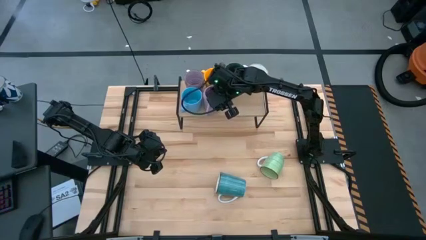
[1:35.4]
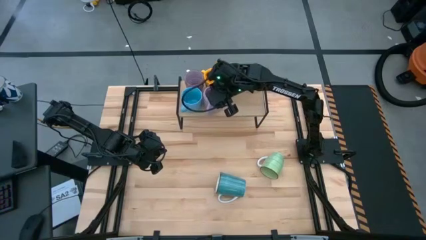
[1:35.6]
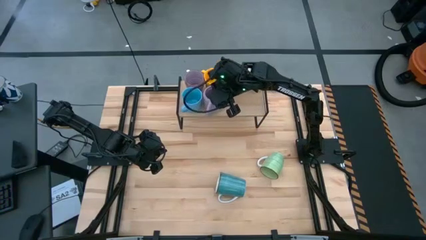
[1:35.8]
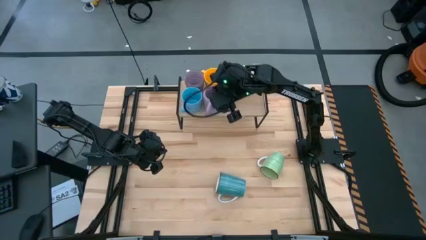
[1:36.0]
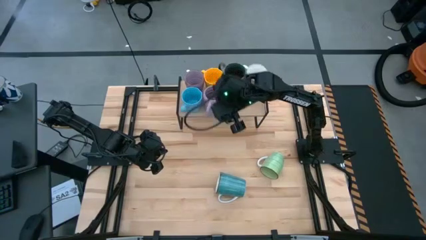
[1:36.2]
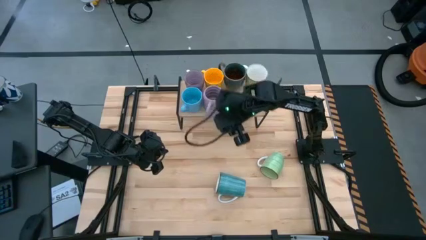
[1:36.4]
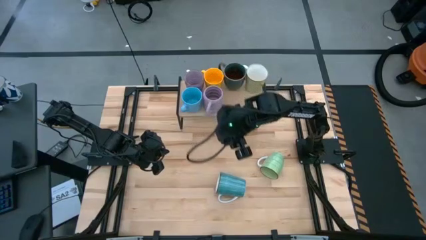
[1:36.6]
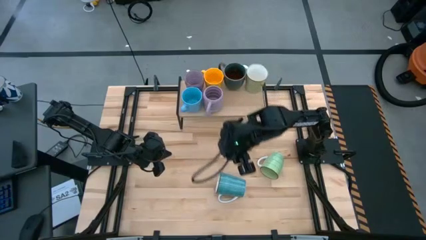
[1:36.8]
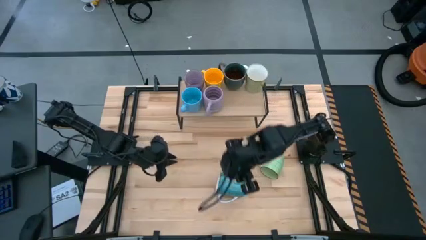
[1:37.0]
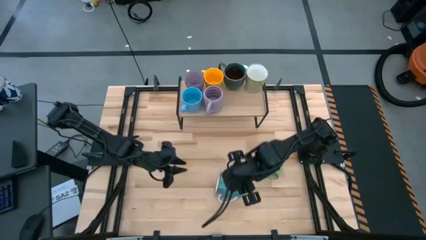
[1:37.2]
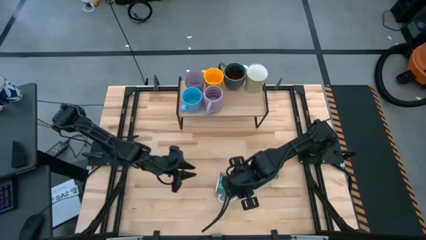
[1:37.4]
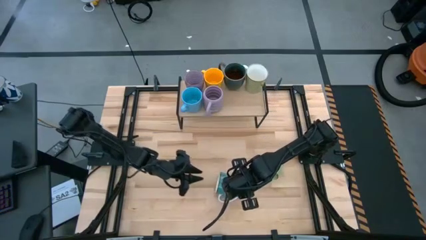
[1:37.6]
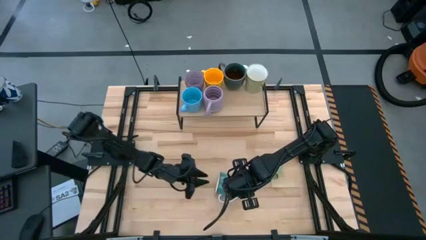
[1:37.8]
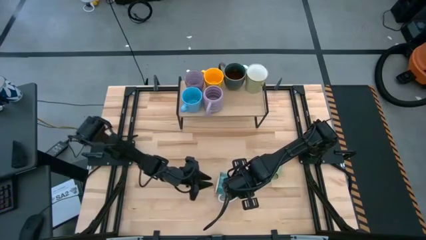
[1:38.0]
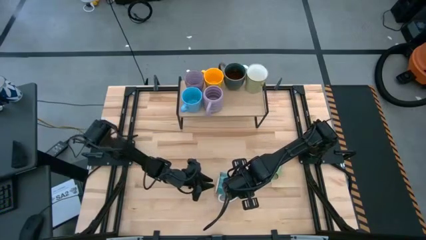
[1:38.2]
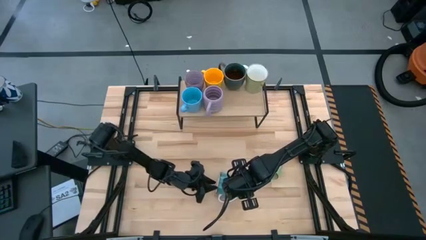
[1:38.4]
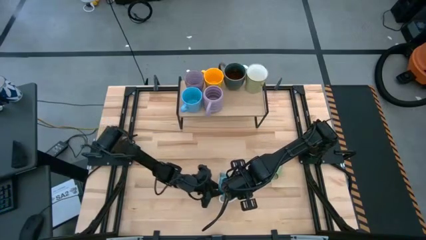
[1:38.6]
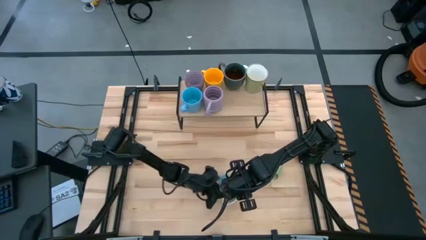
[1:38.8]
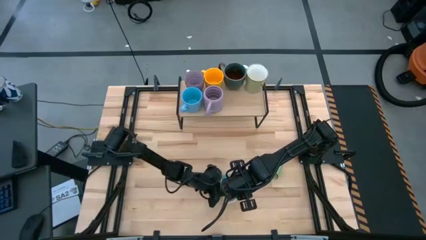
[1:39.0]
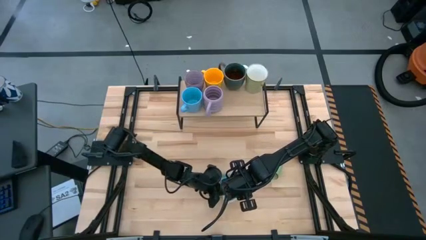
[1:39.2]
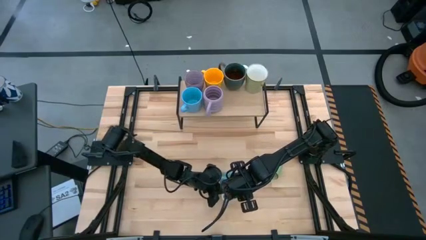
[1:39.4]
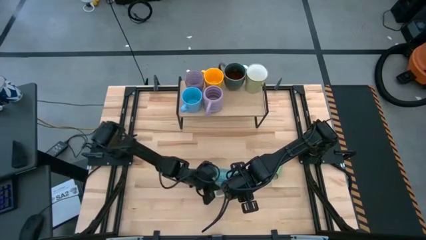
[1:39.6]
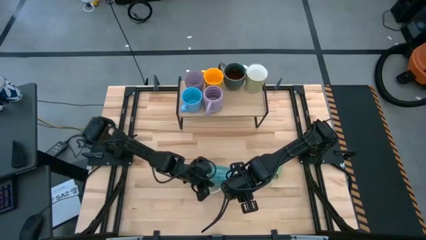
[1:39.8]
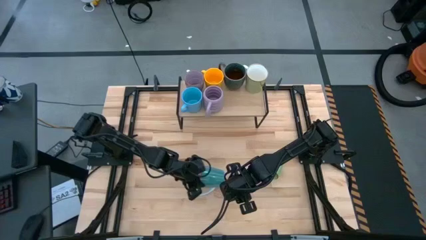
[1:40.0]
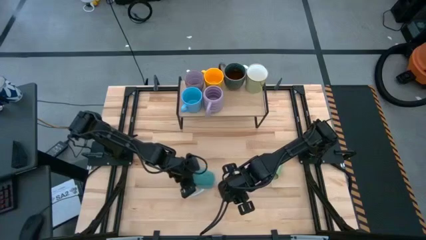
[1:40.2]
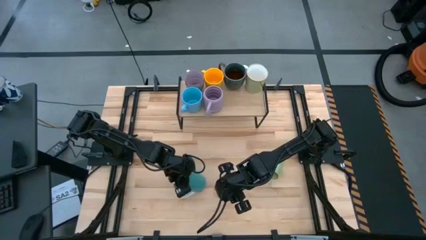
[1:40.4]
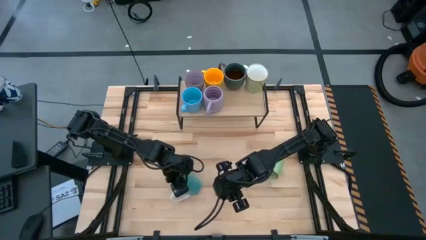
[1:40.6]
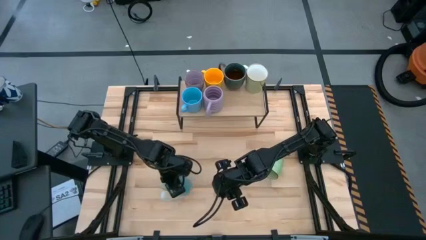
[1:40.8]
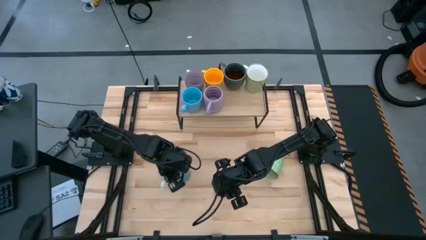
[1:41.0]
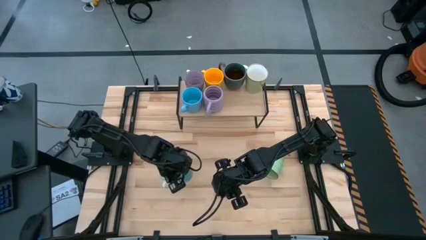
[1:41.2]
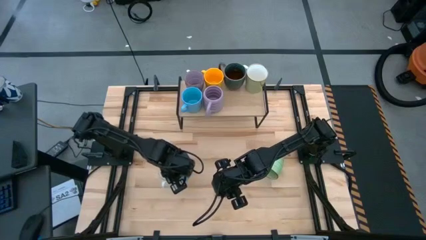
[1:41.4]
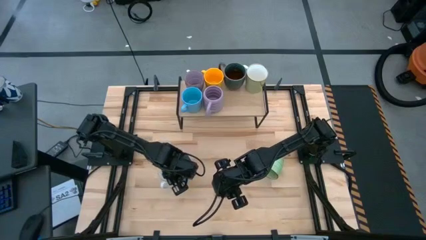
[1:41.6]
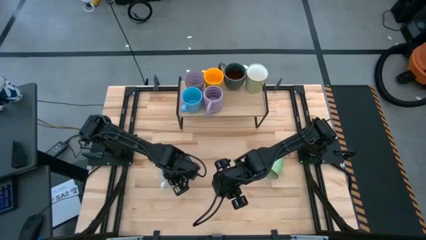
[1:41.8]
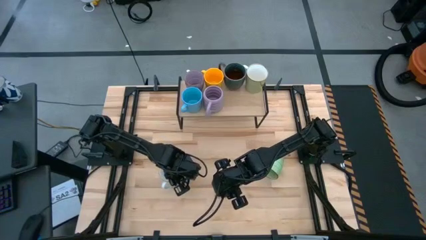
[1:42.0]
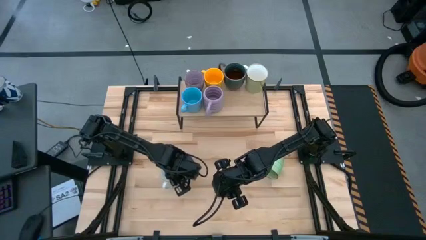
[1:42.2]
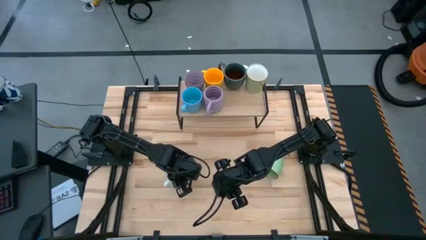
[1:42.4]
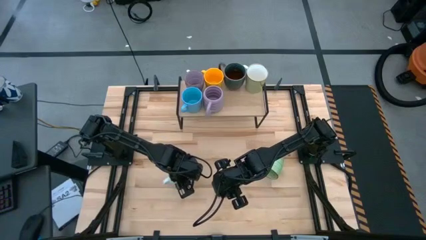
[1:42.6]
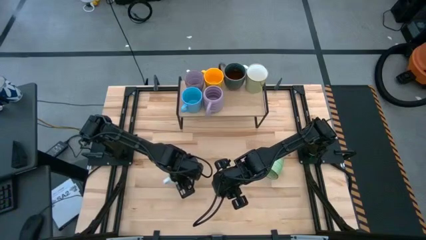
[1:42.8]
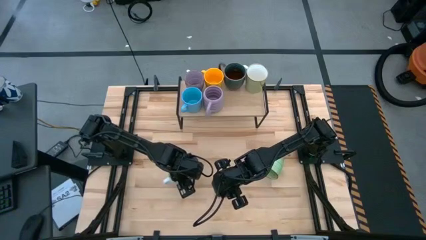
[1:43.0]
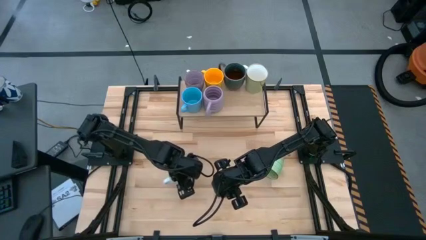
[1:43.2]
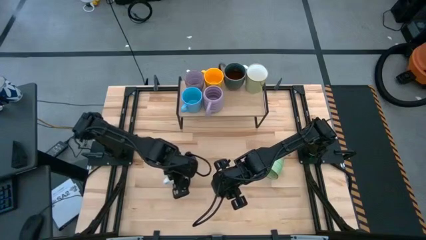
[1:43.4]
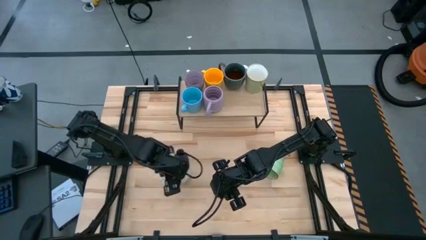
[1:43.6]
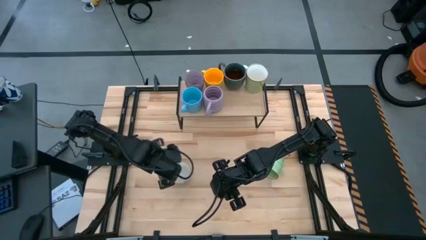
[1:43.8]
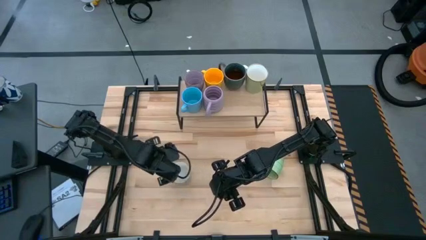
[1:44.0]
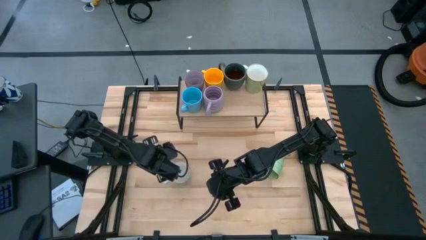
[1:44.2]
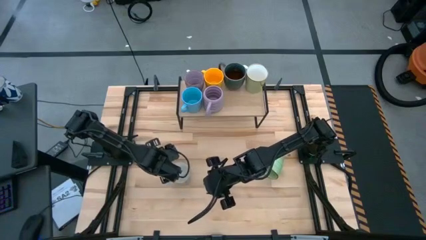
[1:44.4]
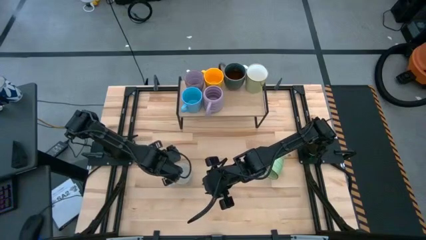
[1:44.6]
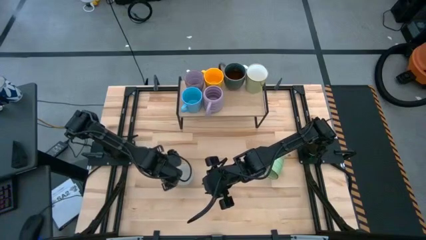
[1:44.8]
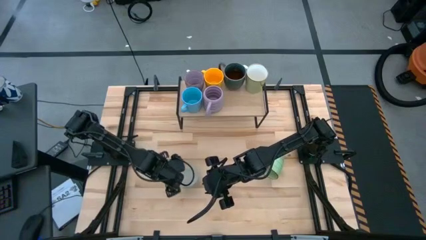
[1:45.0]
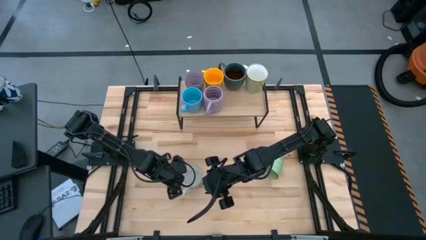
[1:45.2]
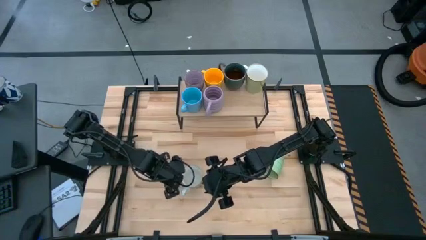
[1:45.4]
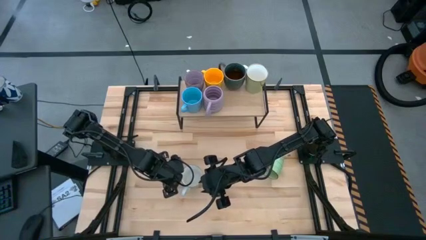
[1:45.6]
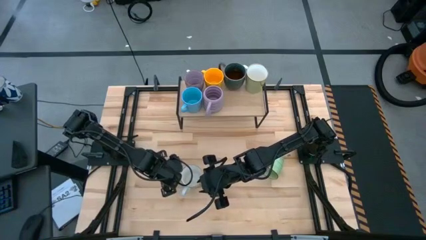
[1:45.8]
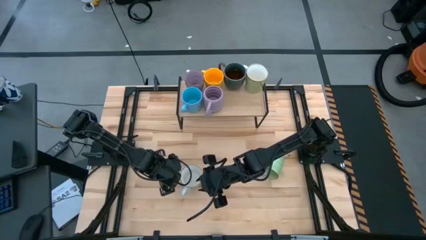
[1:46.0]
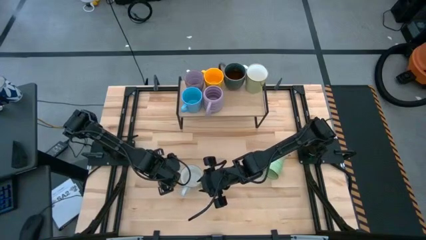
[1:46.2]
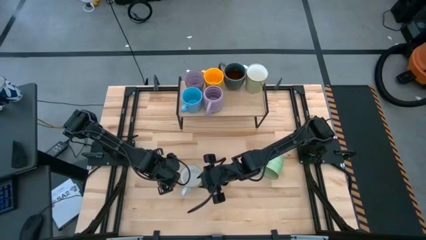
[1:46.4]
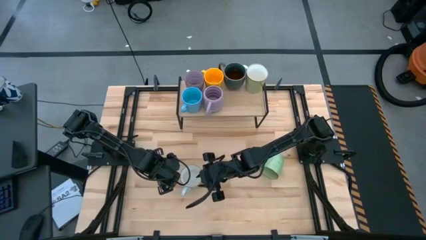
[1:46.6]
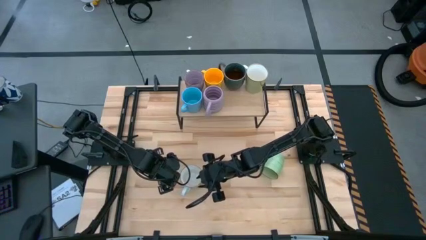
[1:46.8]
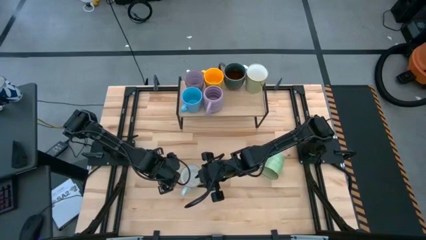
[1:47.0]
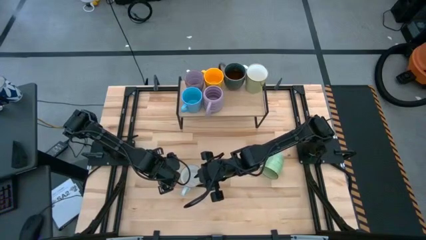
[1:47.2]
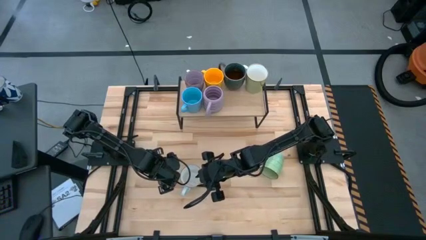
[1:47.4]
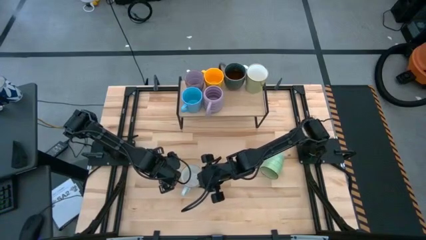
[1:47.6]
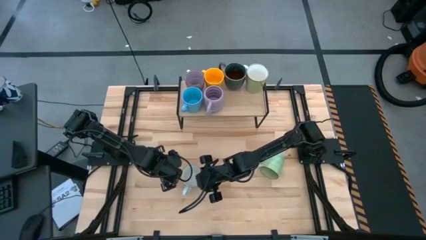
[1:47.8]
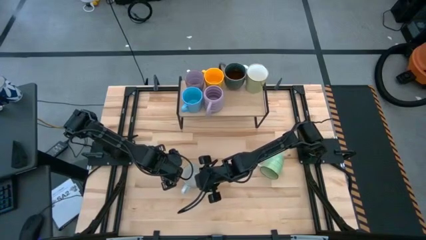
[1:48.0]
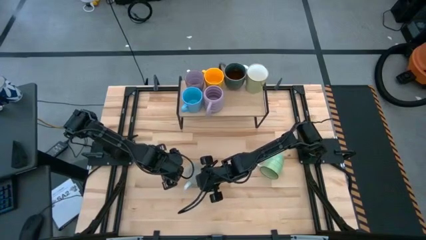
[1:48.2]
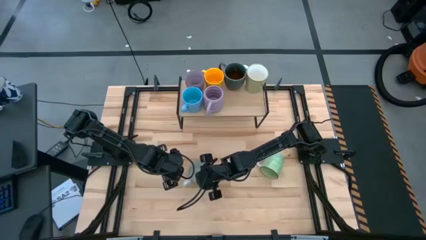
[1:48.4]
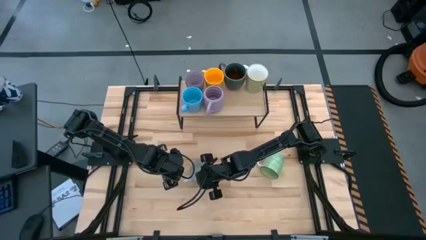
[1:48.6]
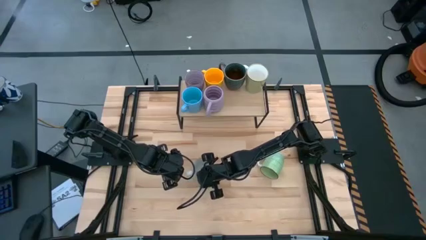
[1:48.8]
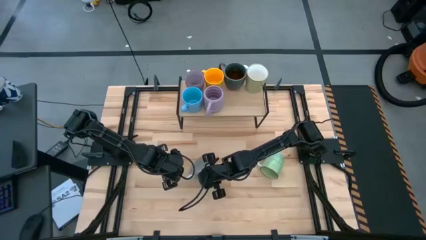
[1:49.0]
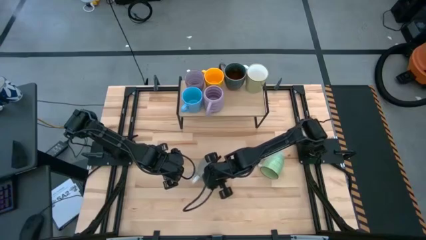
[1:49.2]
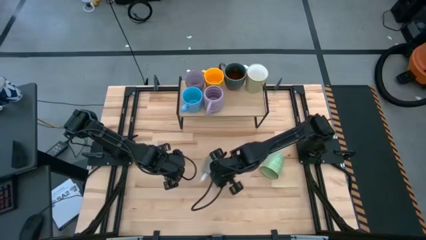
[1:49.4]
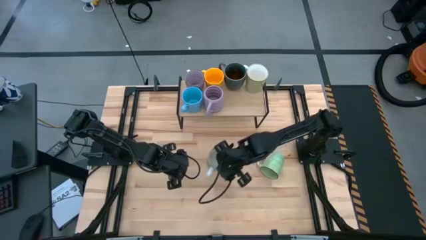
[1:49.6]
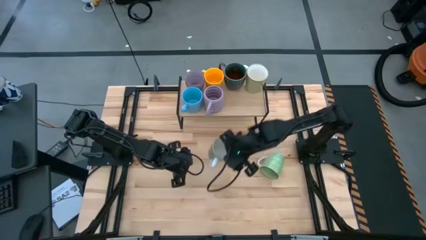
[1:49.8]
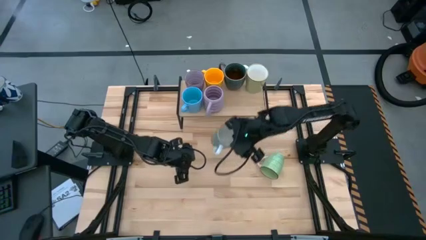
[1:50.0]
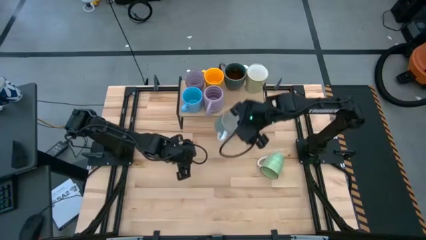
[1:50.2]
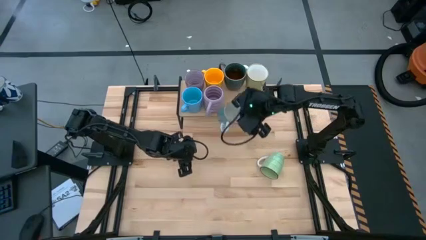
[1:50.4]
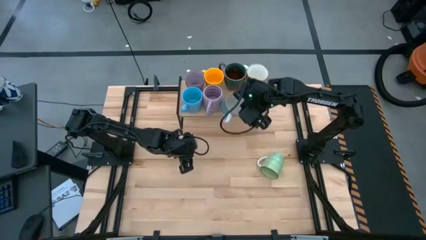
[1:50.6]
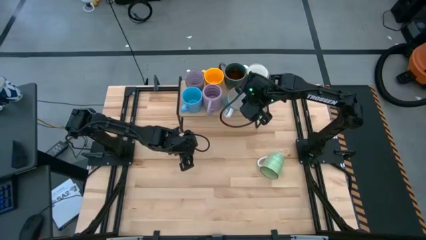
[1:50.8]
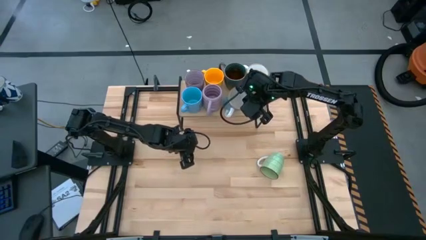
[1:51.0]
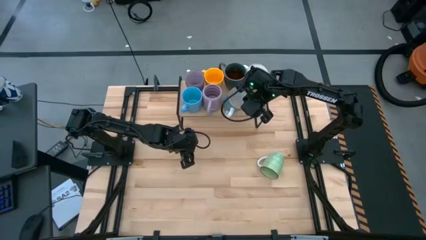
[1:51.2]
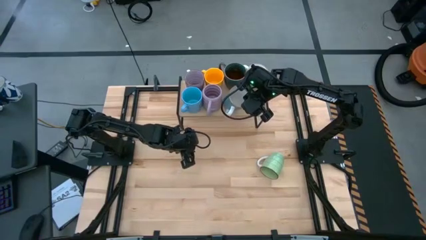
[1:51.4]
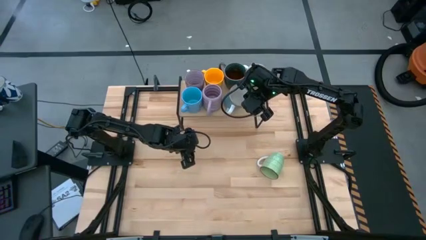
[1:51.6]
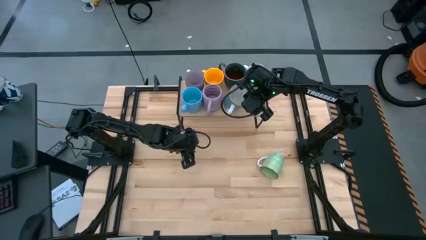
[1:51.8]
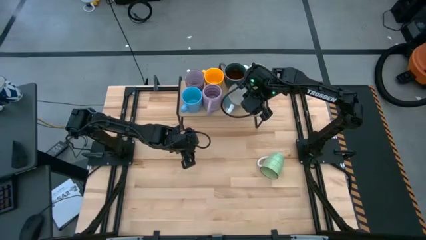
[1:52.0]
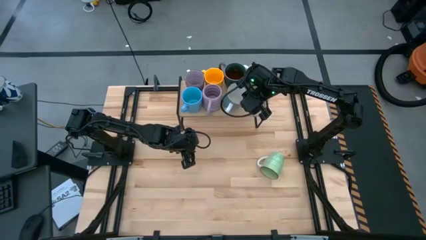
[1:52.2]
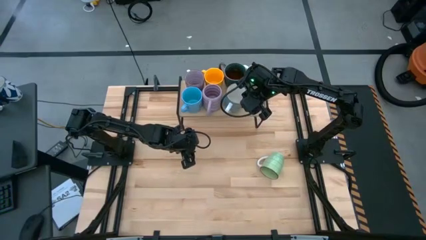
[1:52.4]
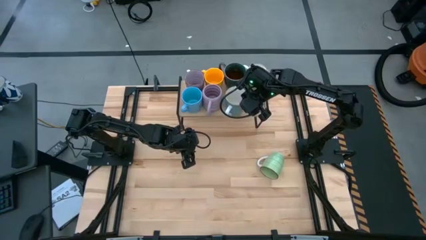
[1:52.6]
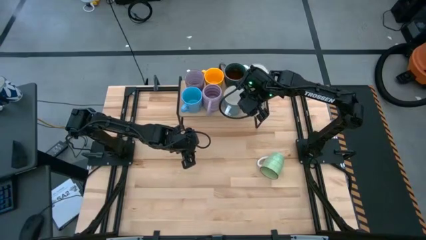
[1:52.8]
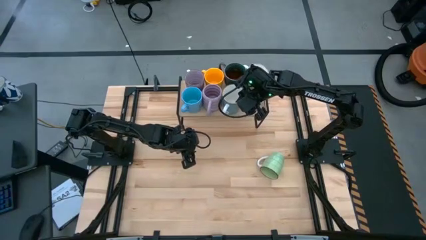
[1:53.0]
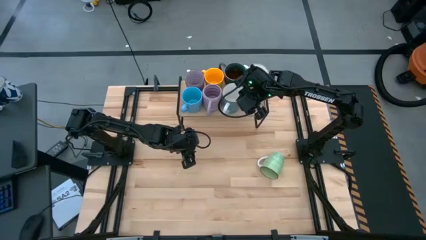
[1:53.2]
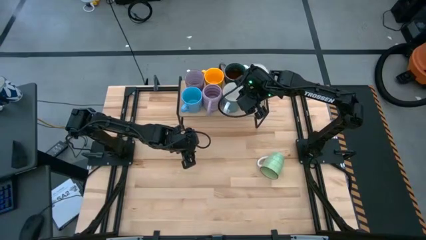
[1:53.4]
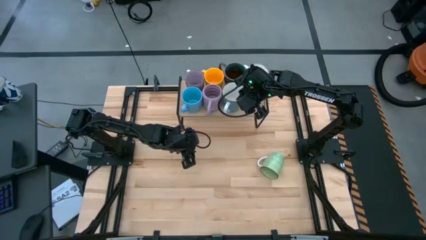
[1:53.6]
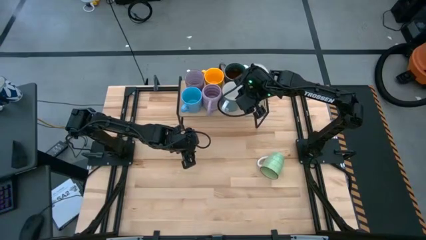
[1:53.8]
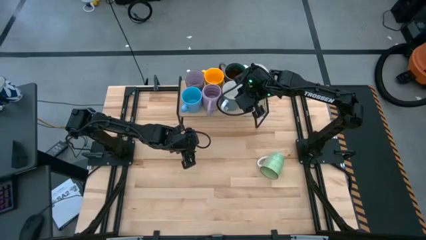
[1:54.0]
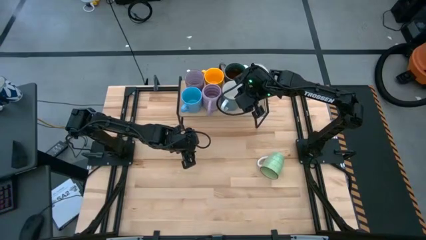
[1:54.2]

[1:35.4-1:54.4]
Task: Place coffee mugs
Put the blue mug on the shelf
